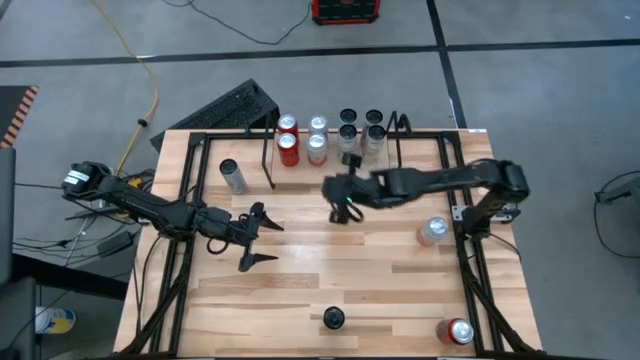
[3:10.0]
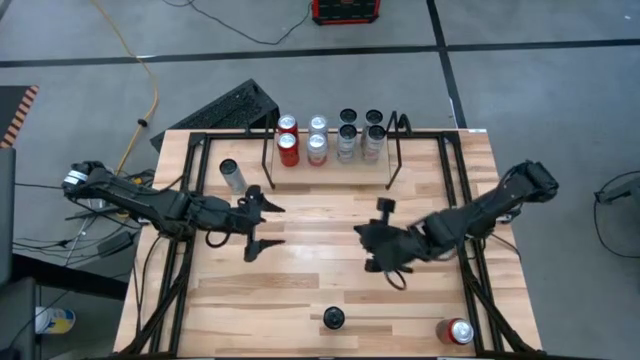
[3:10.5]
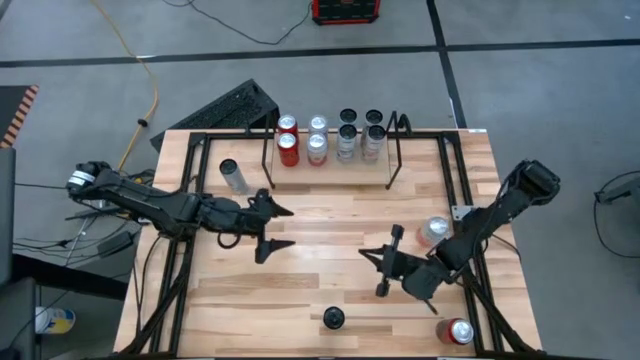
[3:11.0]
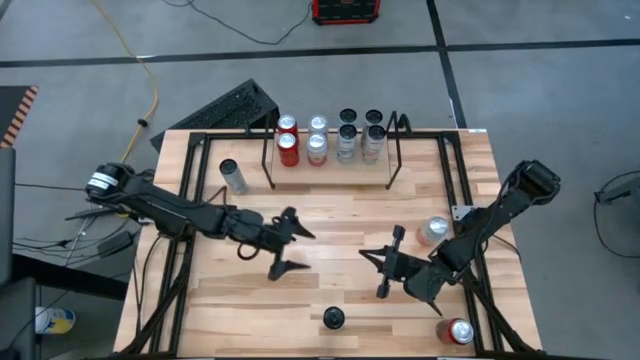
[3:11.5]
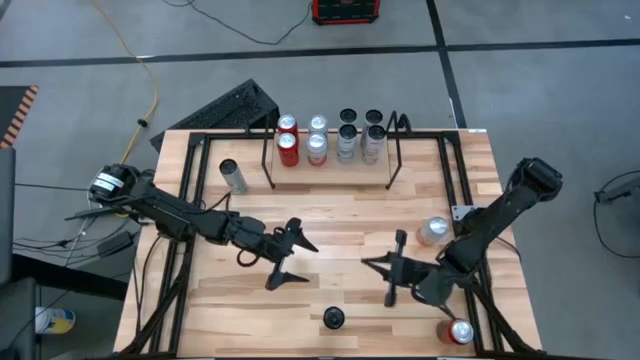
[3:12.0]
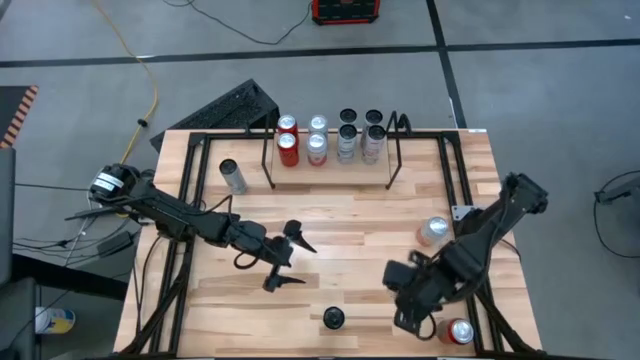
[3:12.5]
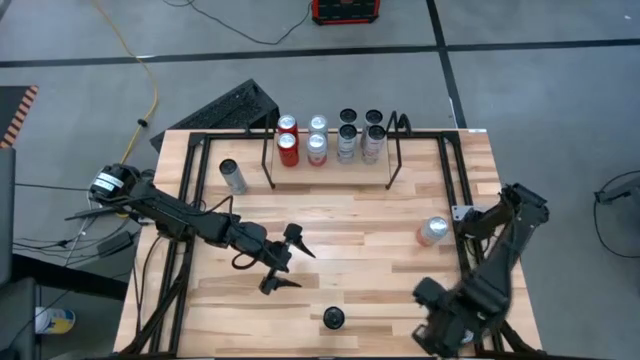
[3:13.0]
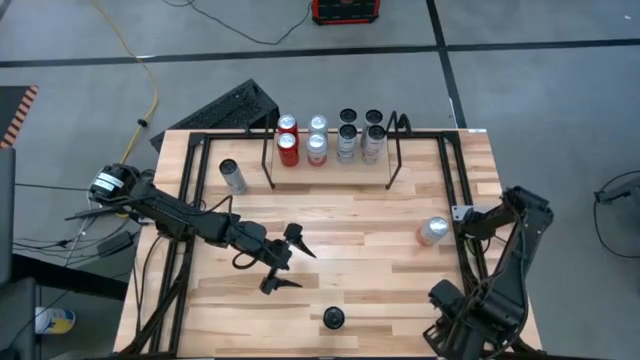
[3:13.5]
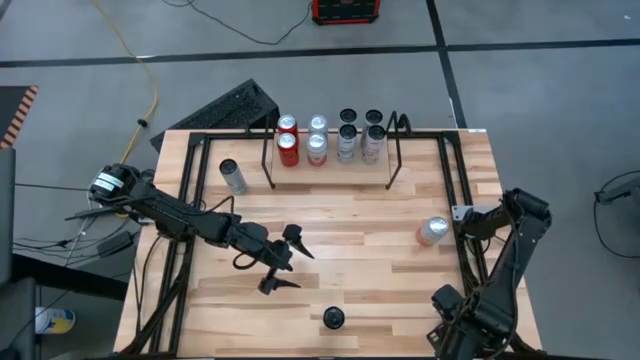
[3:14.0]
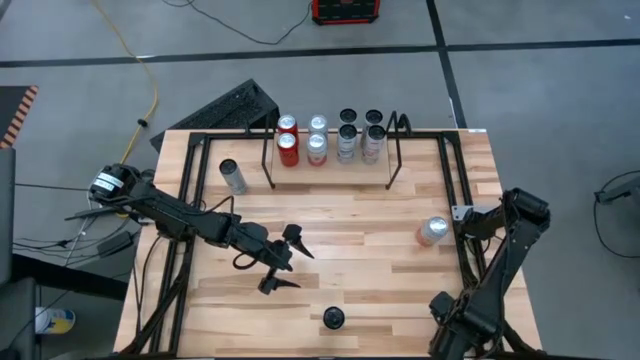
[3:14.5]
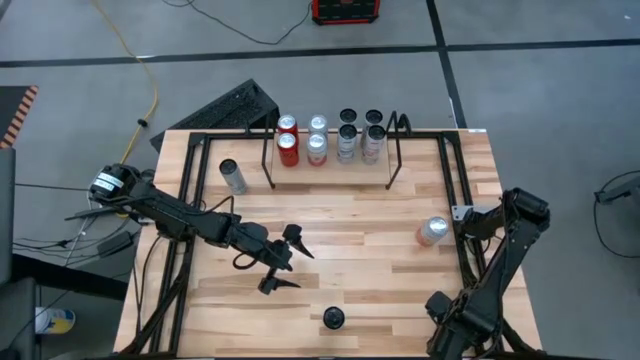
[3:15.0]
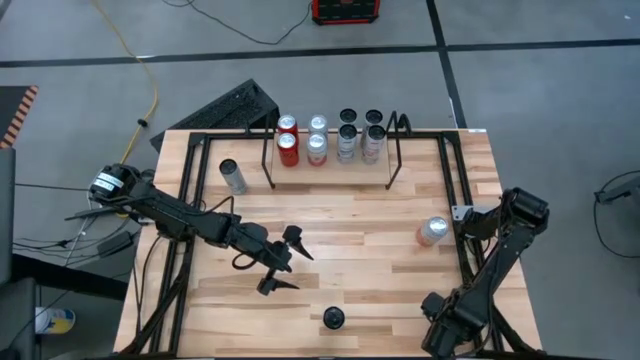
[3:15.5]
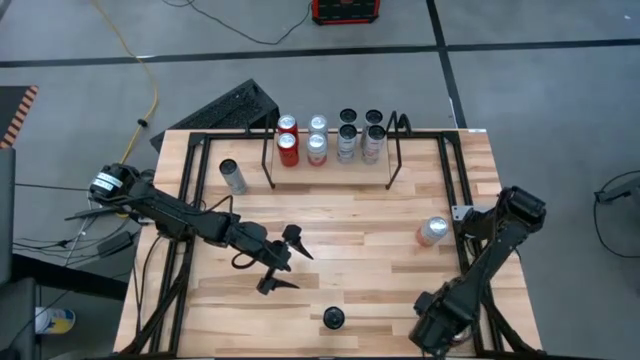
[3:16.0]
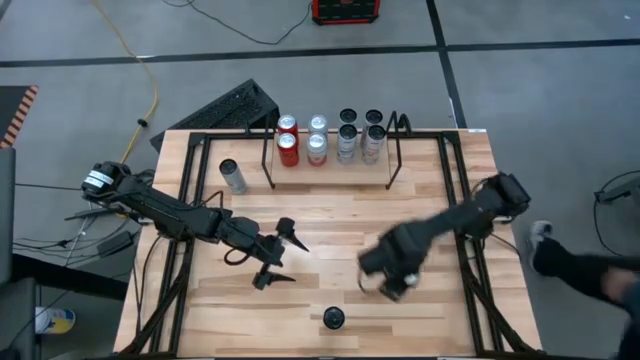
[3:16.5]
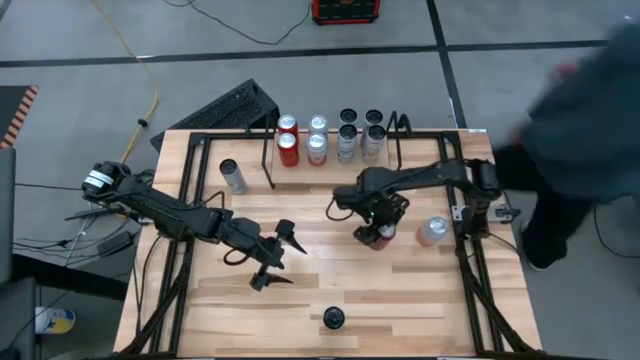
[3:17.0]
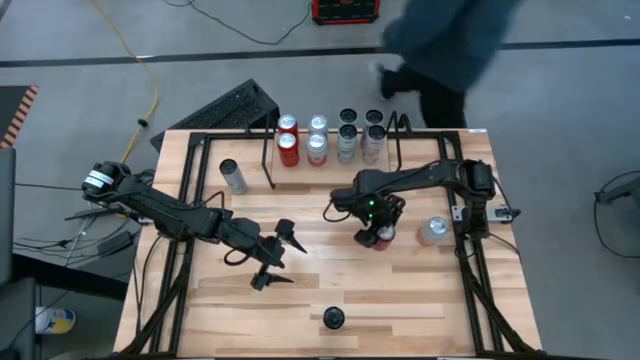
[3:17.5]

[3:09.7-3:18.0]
Task: Place canned beverage on shelf
Put the red black soda can on the shelf and align with other red black soda cans

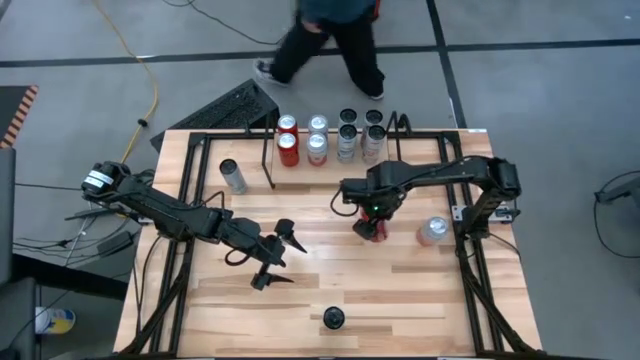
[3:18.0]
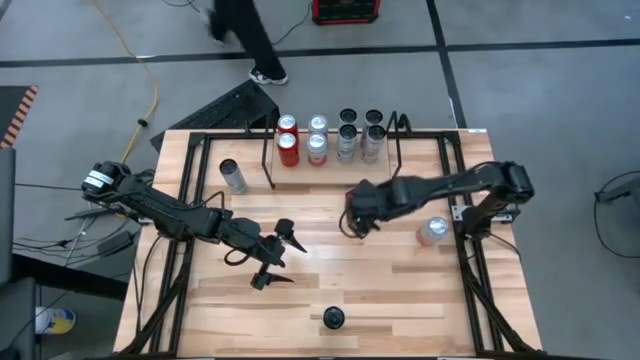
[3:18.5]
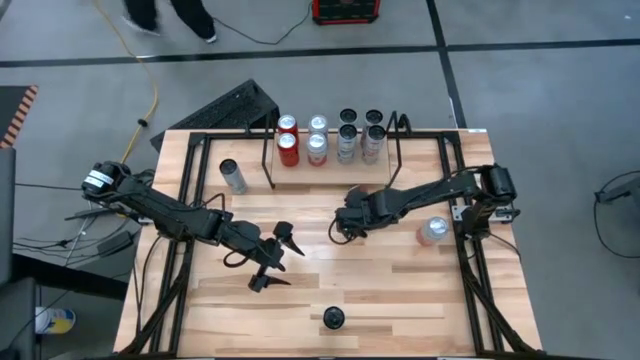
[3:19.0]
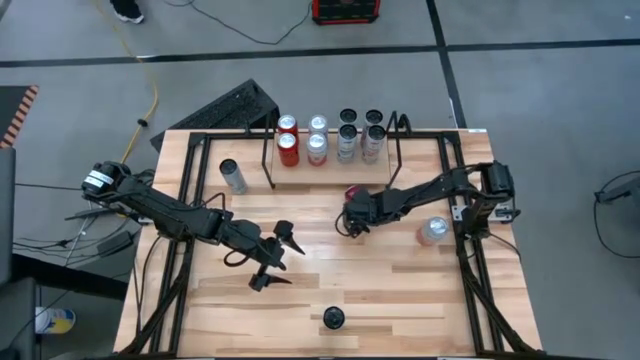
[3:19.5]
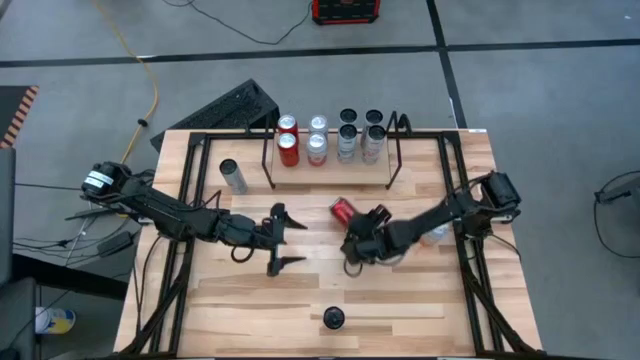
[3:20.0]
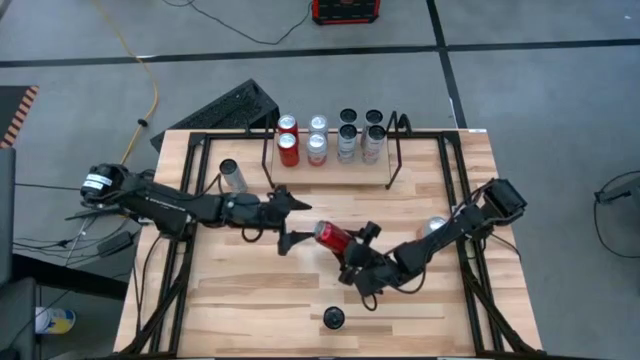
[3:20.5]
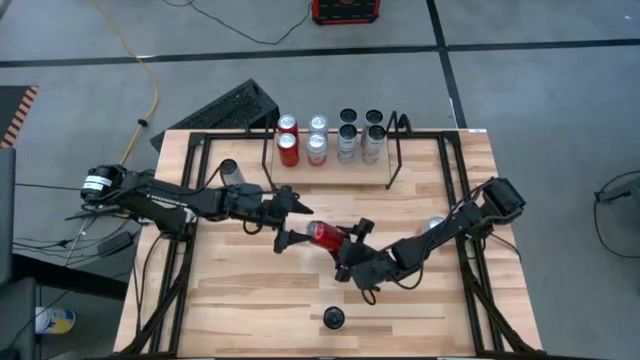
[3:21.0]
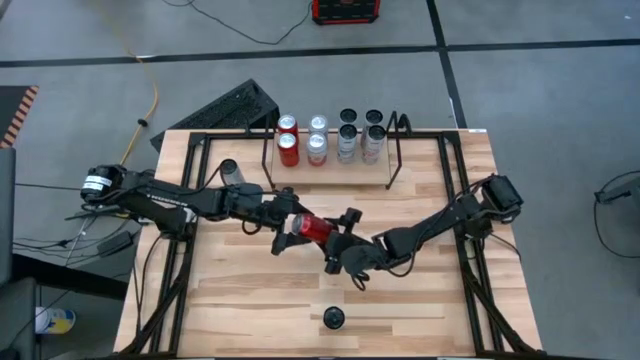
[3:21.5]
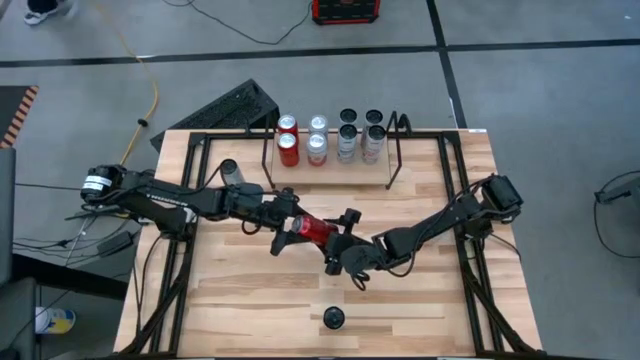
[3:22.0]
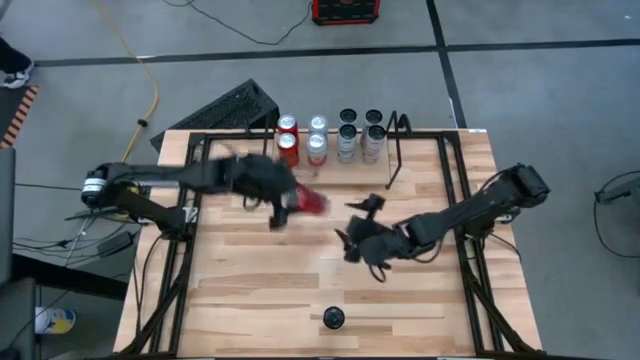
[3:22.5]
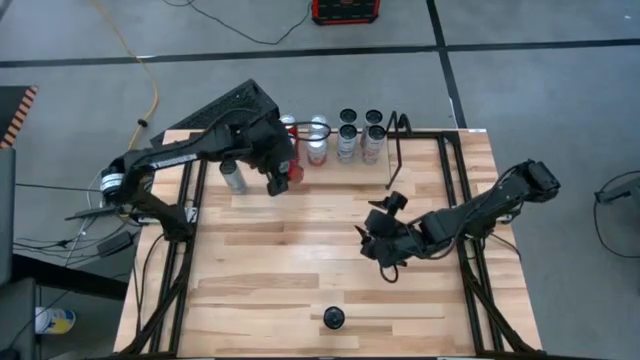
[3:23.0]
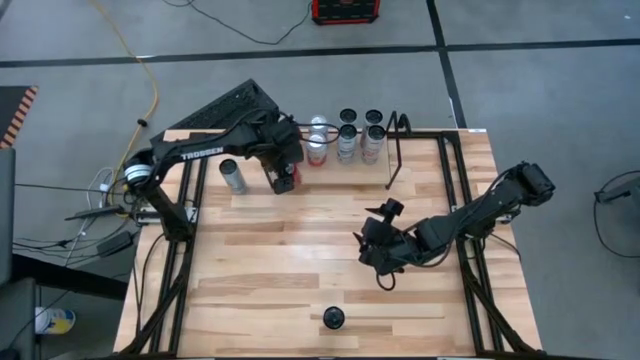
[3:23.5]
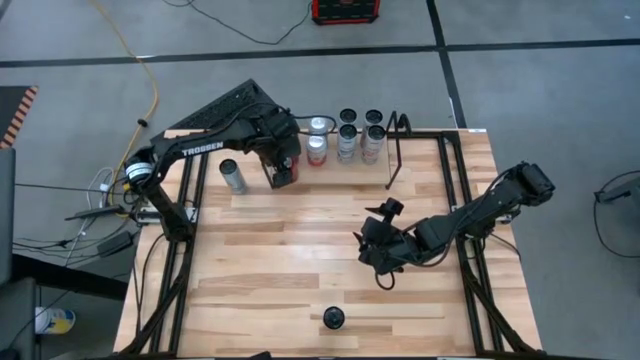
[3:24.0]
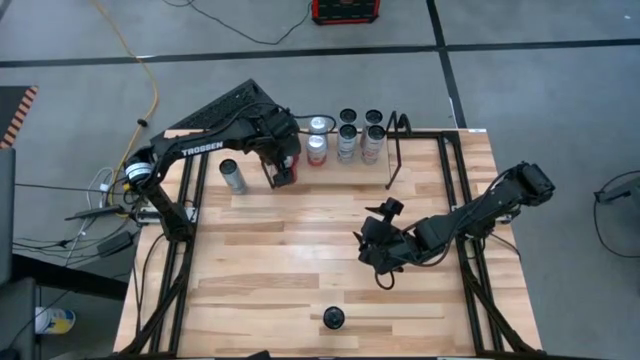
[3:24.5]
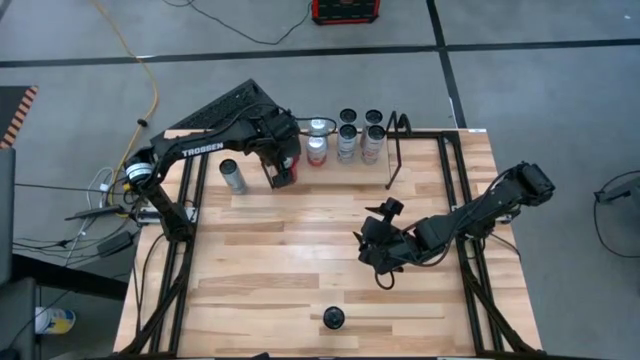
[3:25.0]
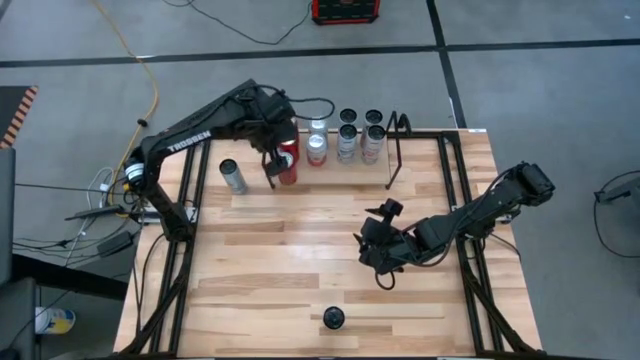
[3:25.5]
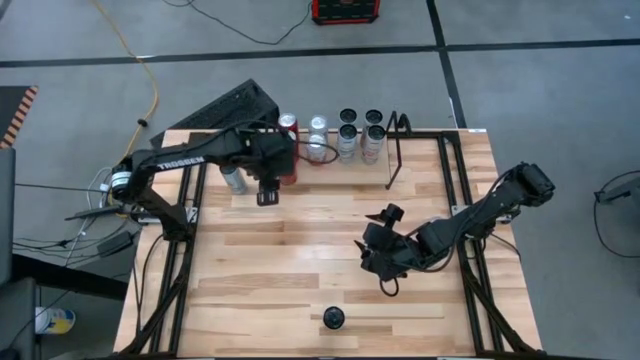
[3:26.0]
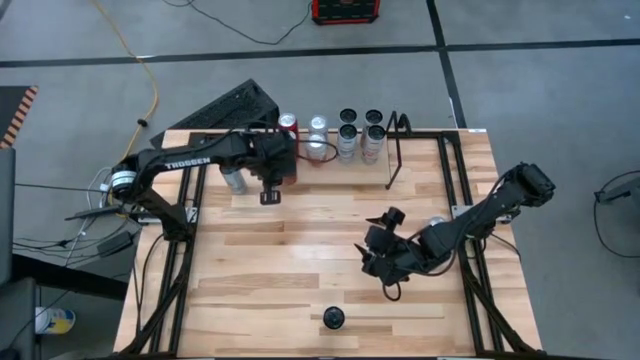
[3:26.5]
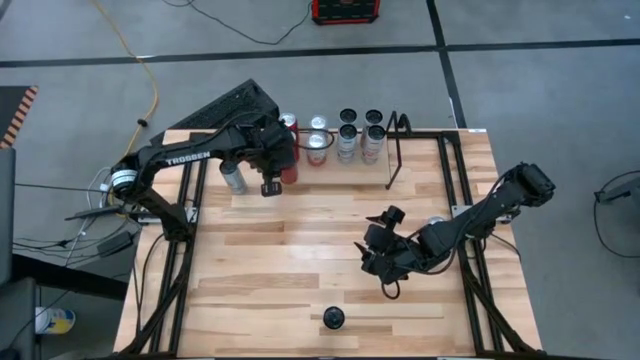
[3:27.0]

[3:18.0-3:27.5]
Put the red black soda can on the shelf and align with other red black soda cans

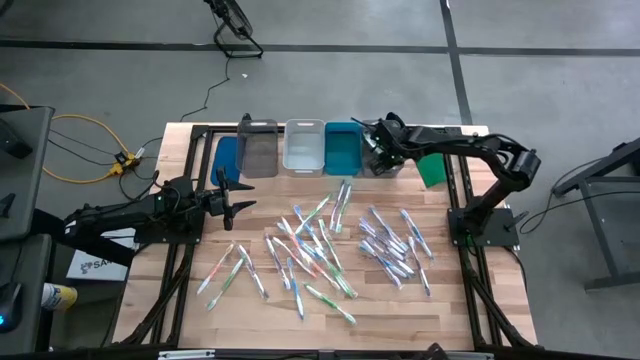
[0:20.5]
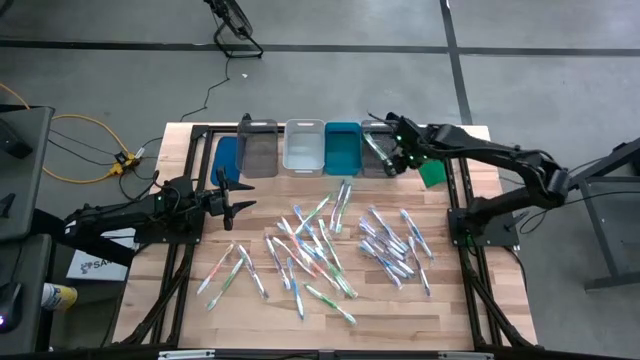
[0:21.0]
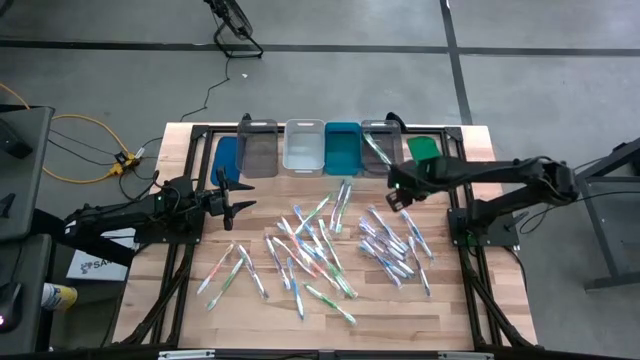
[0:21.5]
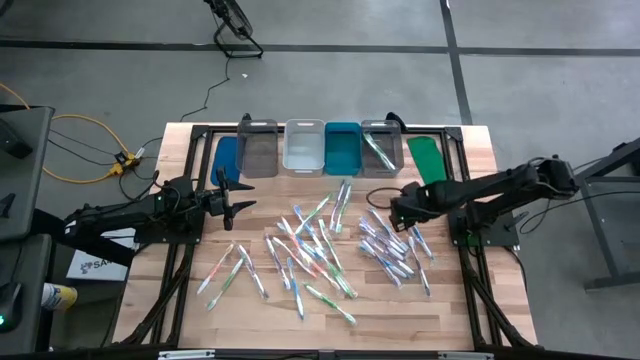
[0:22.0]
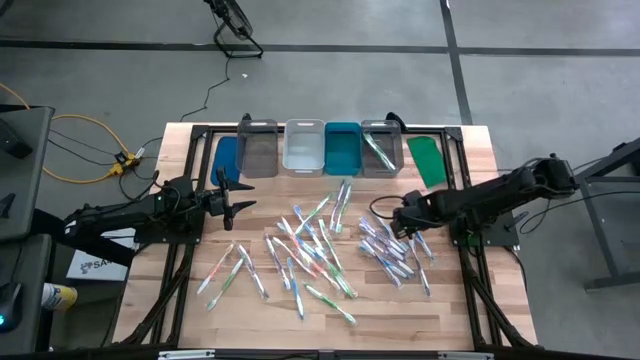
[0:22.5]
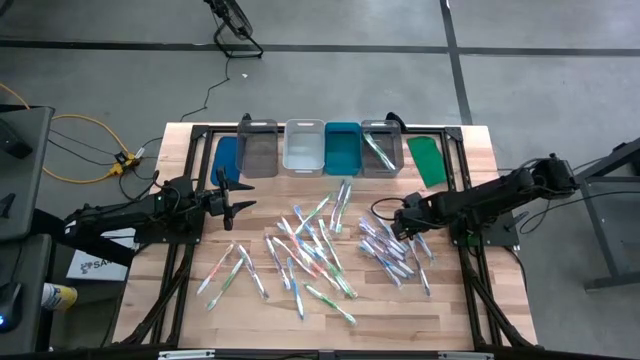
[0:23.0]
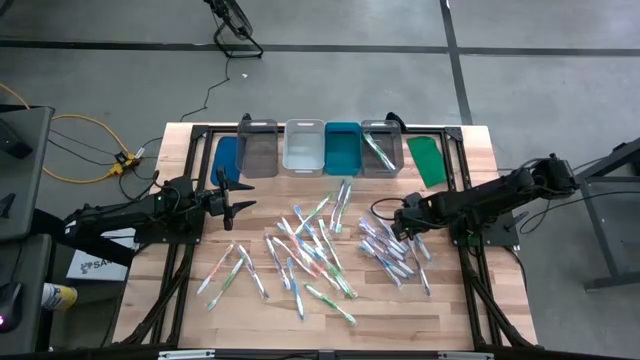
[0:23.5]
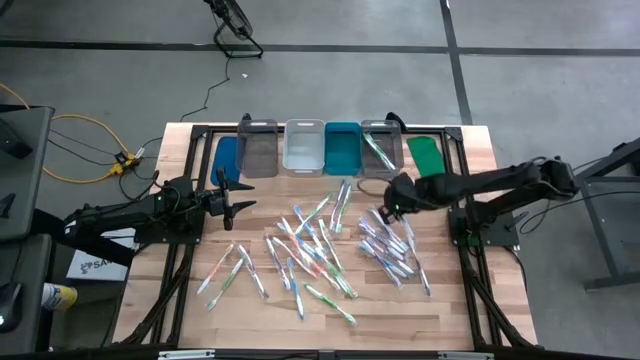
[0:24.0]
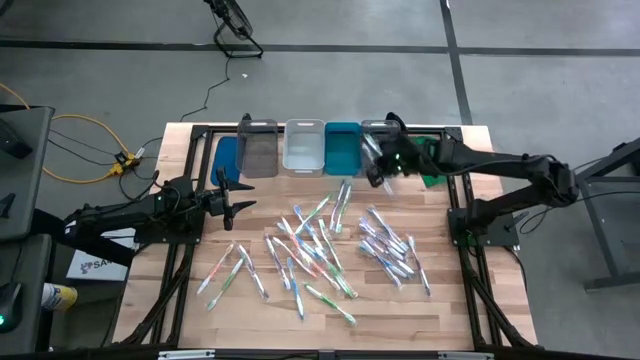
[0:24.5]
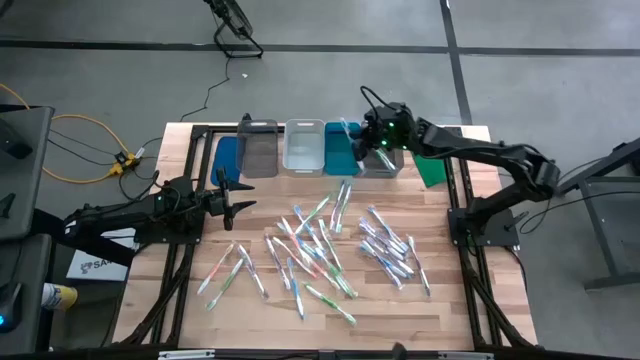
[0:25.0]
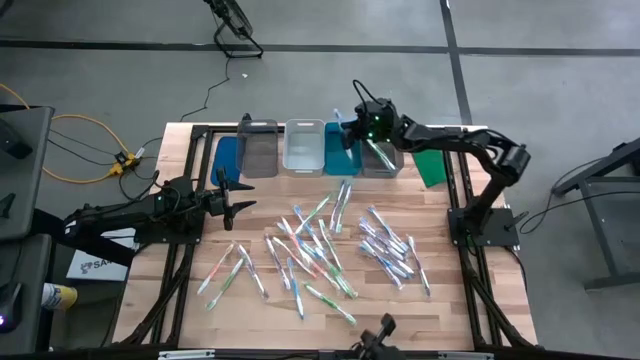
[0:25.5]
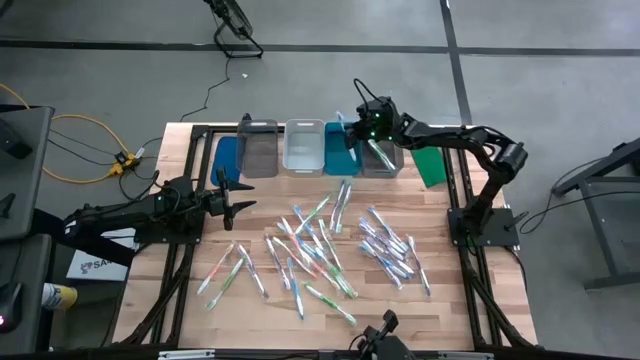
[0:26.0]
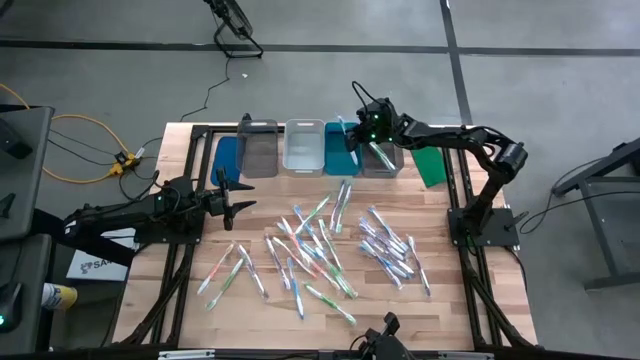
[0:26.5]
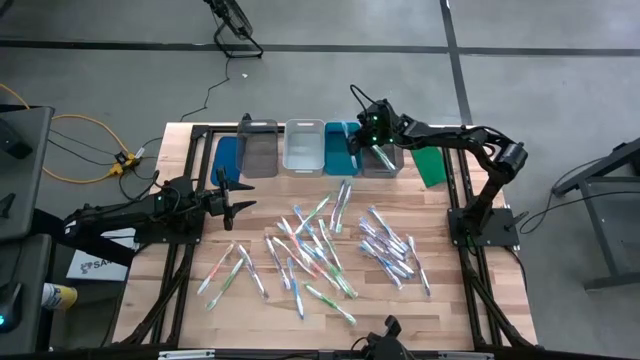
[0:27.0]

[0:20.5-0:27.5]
Task: Pick & Place Toothbrushes
Put the blue toothbrush into the blue bin
